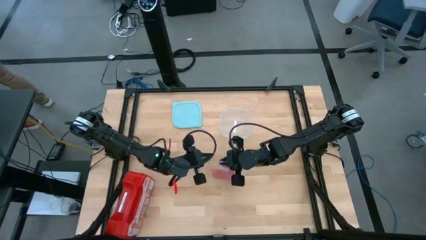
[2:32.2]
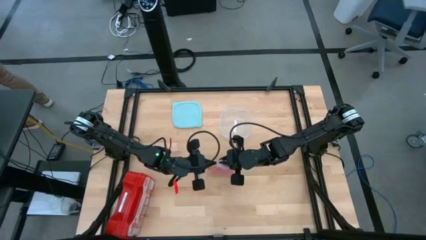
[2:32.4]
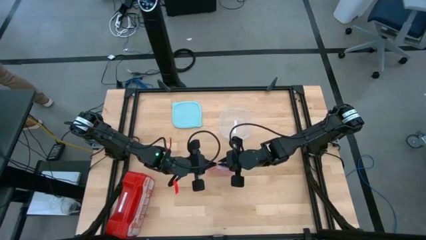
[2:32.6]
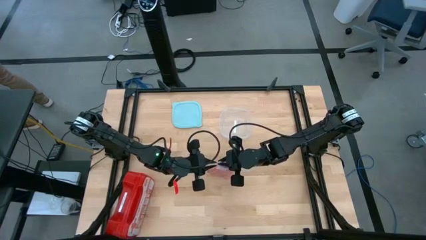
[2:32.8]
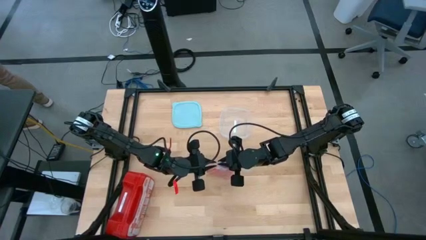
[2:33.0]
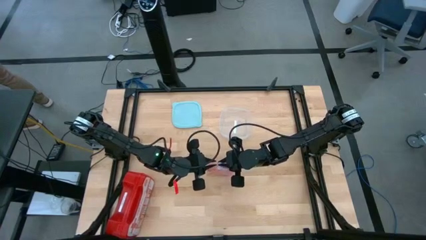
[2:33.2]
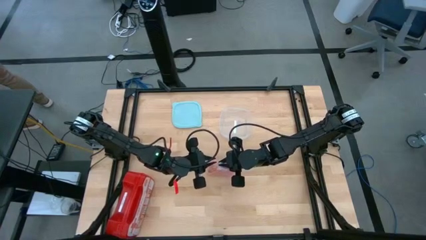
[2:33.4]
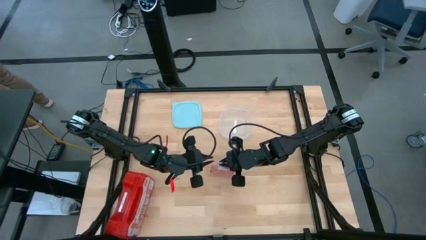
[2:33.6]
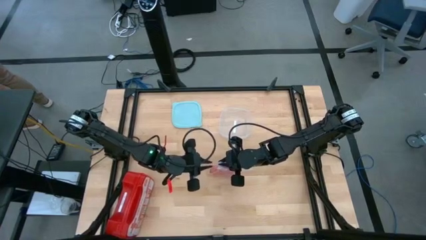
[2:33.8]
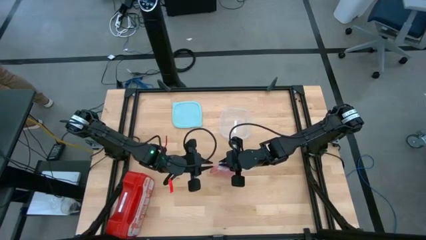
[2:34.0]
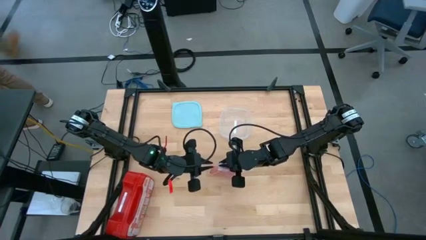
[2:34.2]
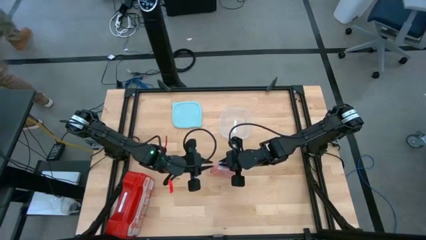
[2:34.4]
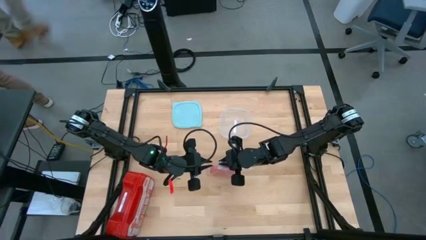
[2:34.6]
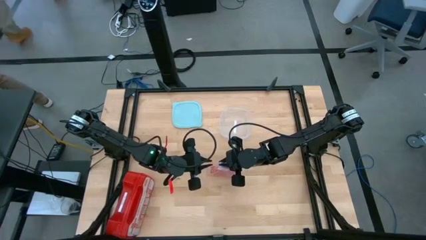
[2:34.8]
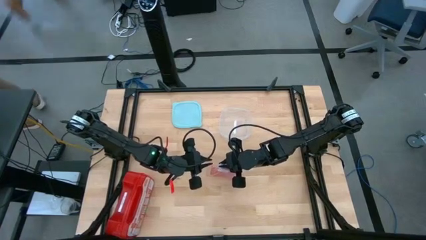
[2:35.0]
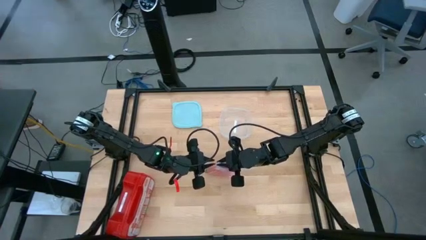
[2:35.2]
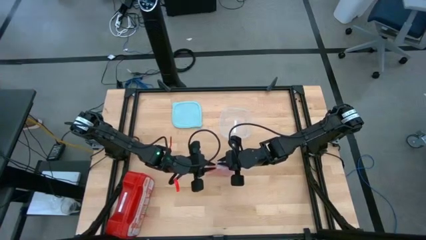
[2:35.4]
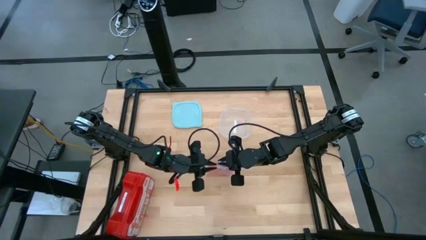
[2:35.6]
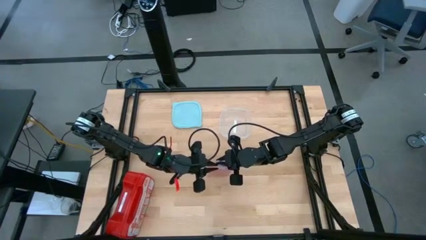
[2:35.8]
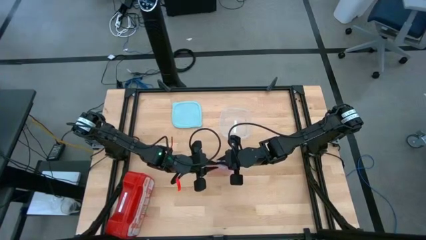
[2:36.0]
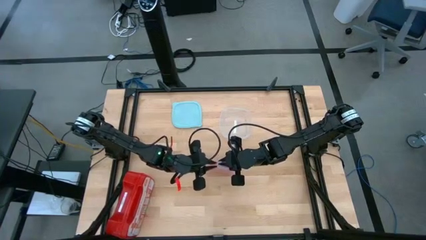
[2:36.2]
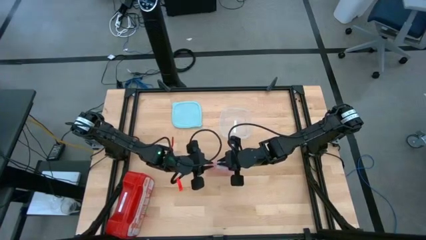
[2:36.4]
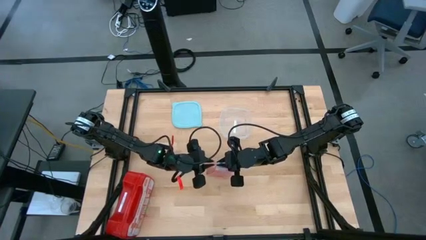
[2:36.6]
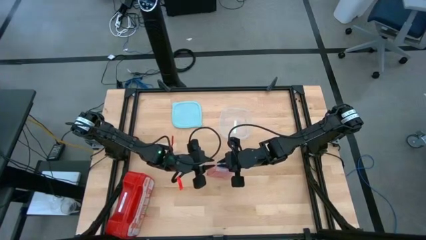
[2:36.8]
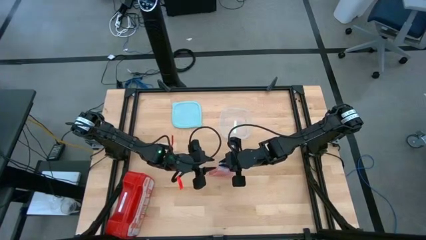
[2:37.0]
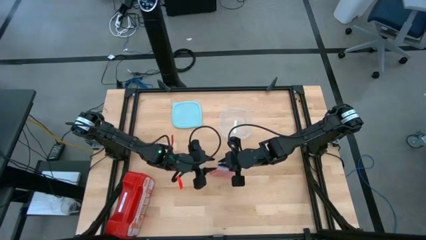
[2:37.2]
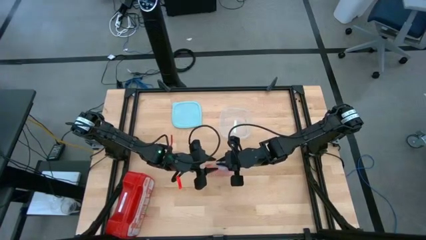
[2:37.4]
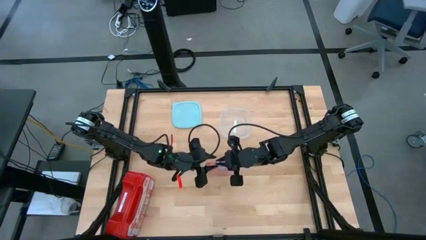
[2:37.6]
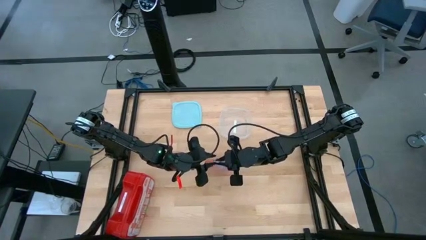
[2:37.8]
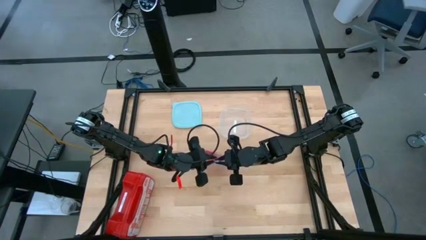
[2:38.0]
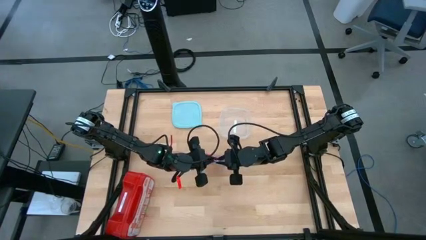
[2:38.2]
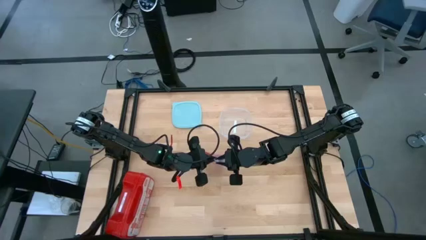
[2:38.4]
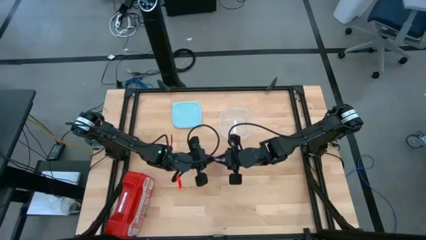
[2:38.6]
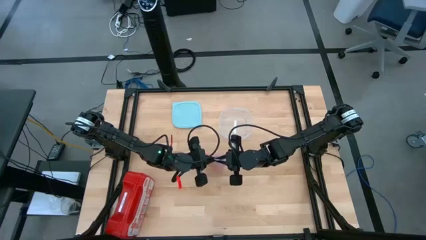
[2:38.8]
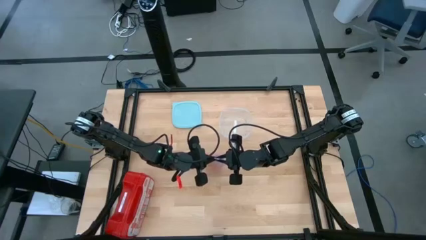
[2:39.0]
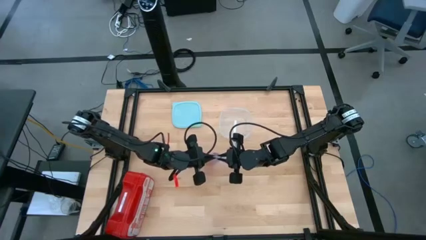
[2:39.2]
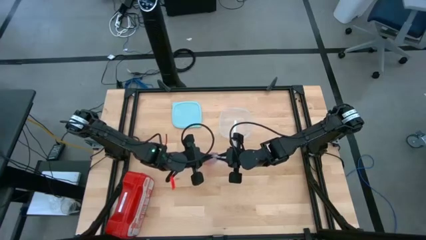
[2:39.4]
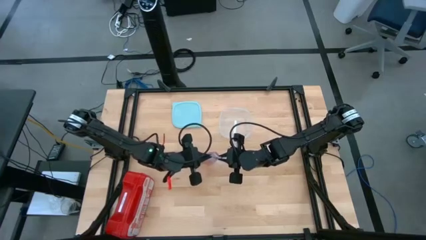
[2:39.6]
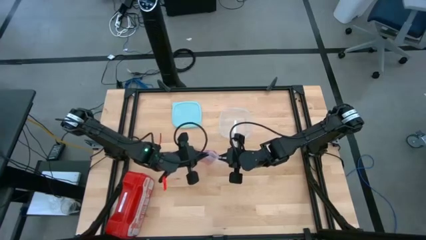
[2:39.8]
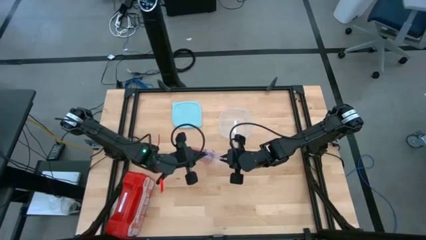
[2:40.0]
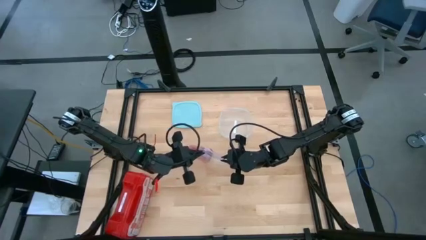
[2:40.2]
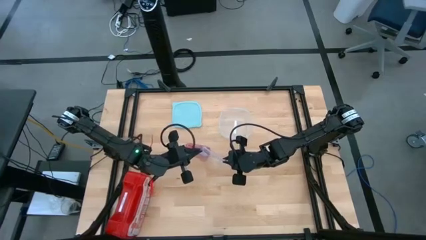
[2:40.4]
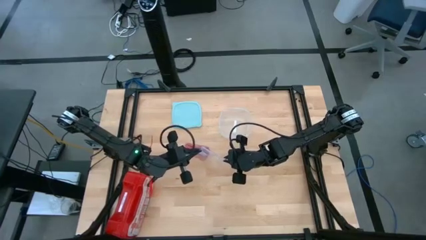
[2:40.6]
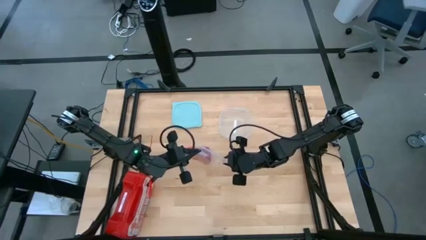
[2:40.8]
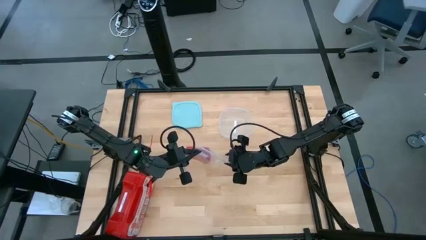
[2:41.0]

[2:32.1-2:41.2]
Task: Roll bandage
Close the transparent zip bag

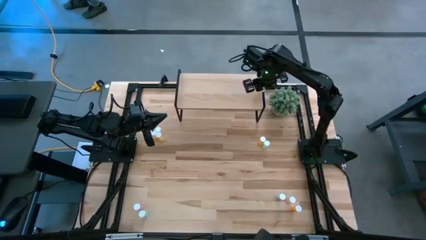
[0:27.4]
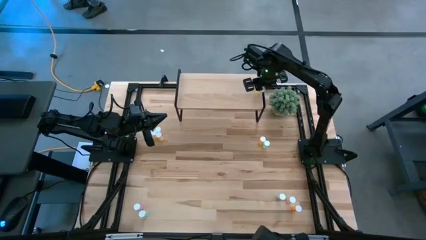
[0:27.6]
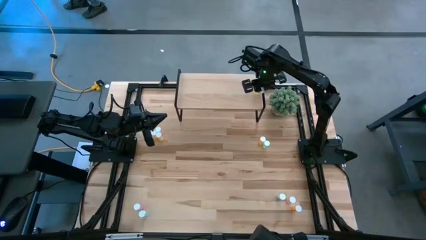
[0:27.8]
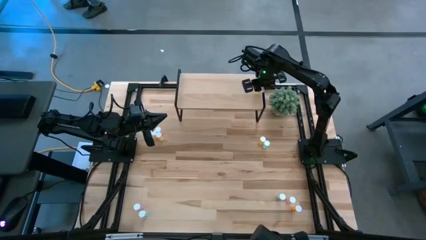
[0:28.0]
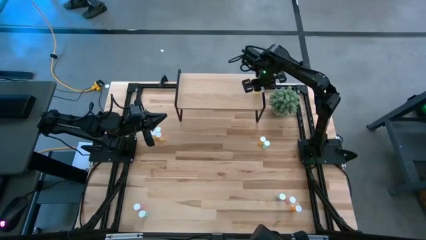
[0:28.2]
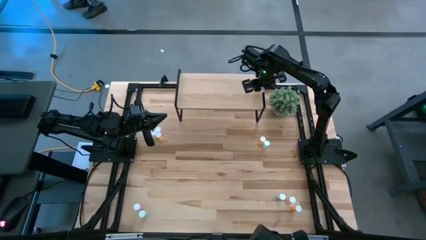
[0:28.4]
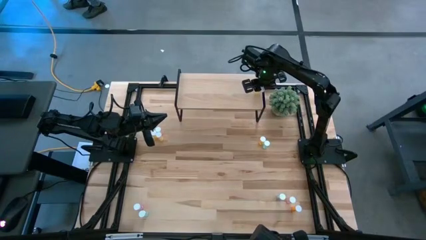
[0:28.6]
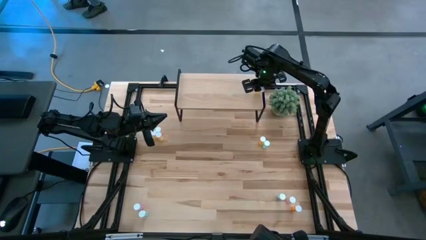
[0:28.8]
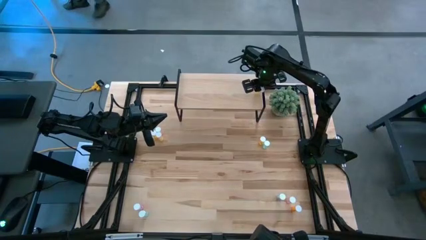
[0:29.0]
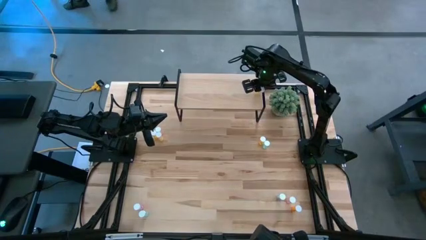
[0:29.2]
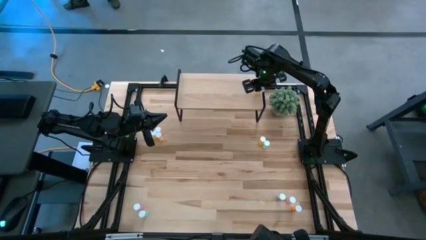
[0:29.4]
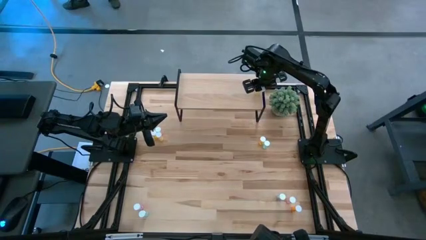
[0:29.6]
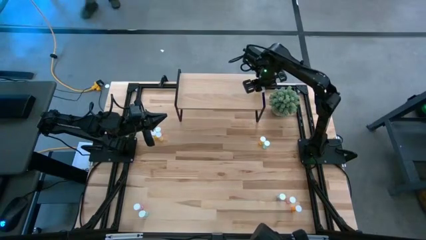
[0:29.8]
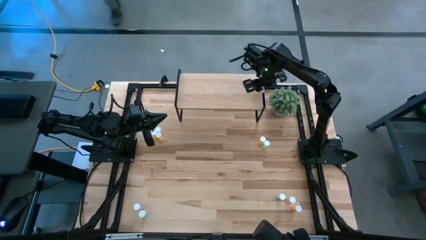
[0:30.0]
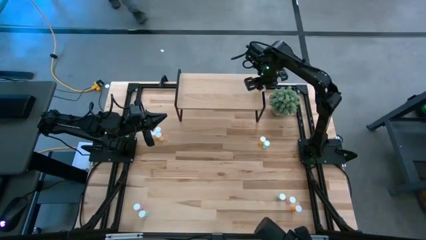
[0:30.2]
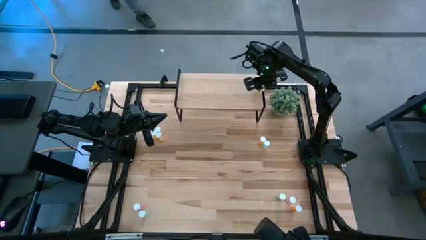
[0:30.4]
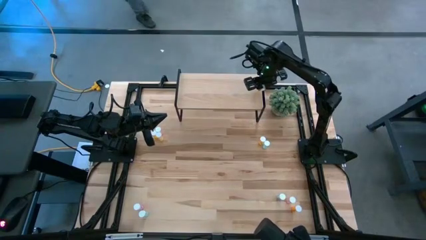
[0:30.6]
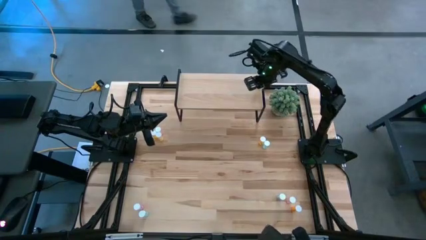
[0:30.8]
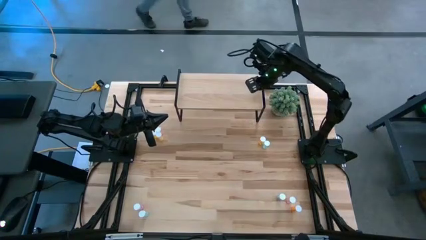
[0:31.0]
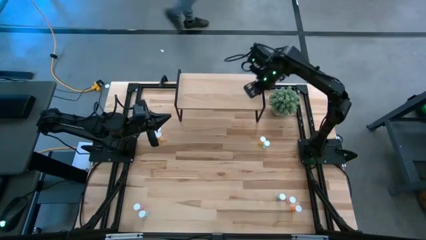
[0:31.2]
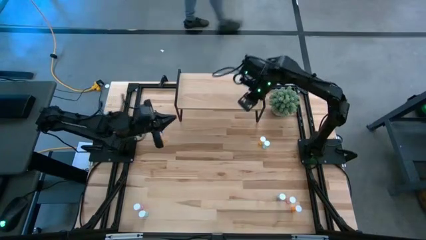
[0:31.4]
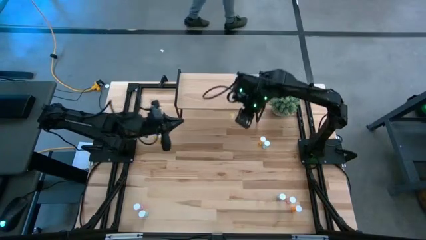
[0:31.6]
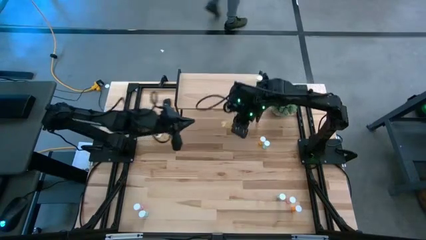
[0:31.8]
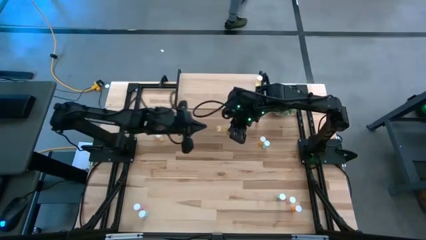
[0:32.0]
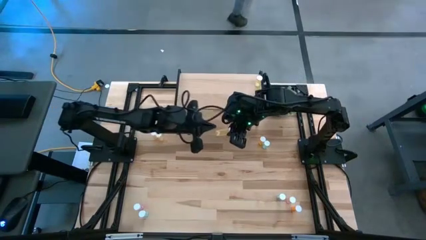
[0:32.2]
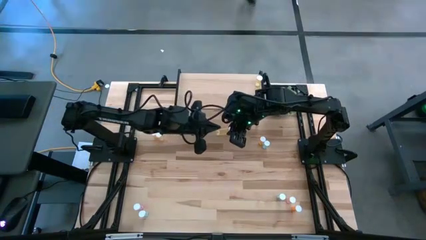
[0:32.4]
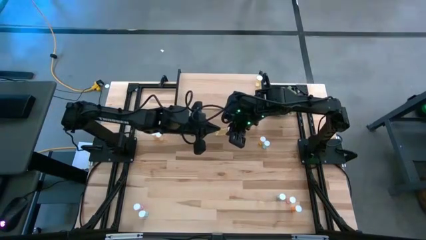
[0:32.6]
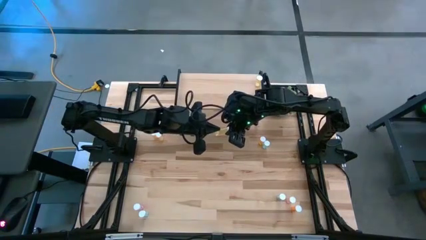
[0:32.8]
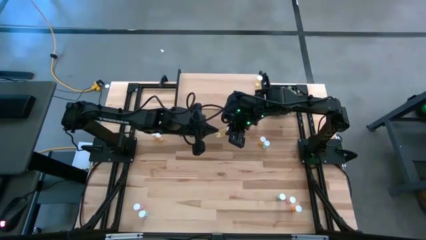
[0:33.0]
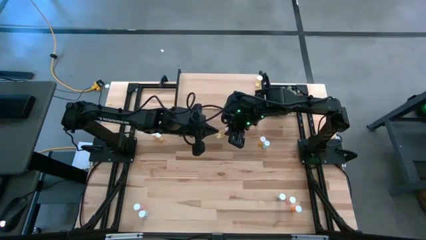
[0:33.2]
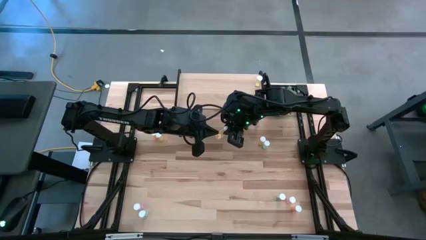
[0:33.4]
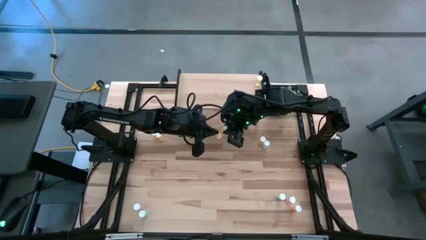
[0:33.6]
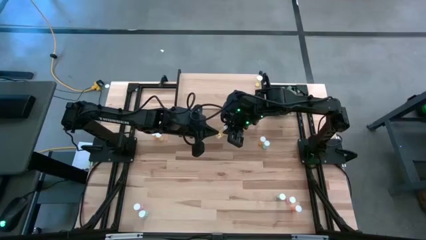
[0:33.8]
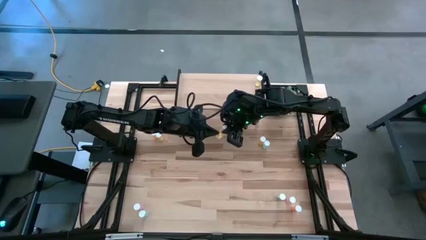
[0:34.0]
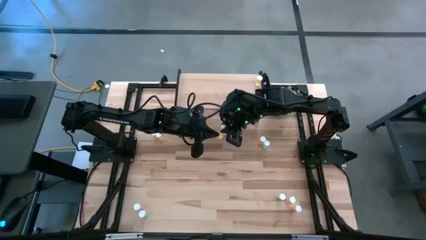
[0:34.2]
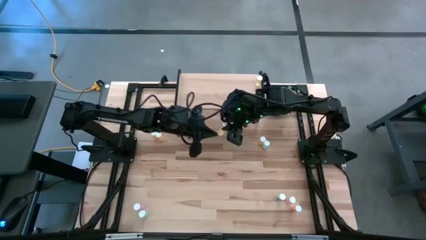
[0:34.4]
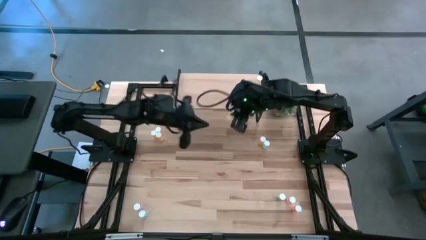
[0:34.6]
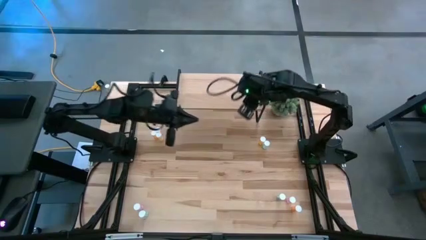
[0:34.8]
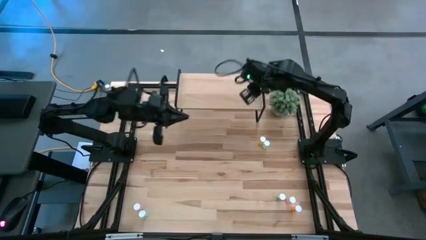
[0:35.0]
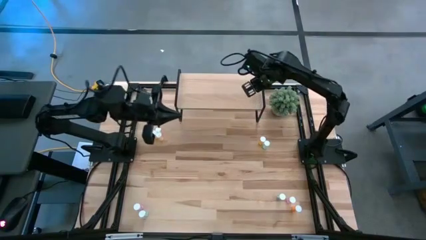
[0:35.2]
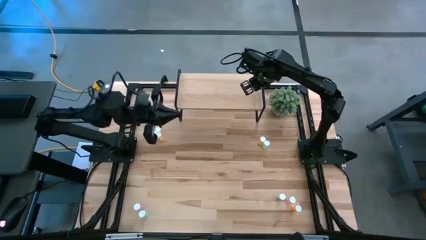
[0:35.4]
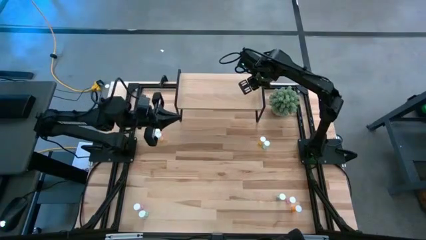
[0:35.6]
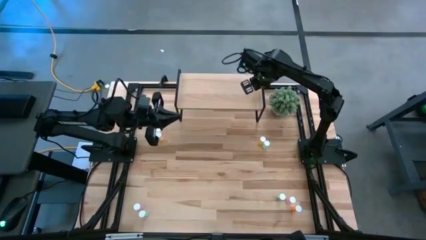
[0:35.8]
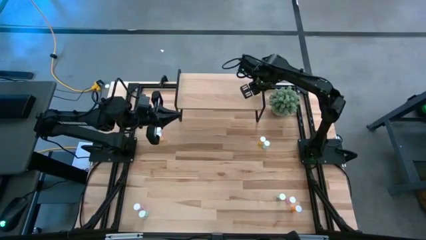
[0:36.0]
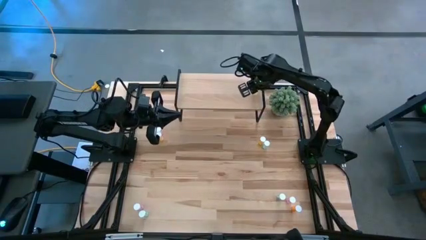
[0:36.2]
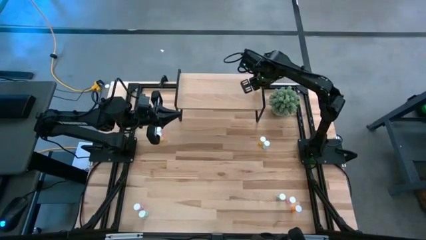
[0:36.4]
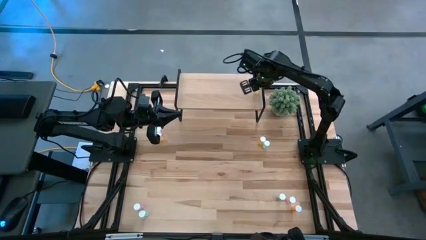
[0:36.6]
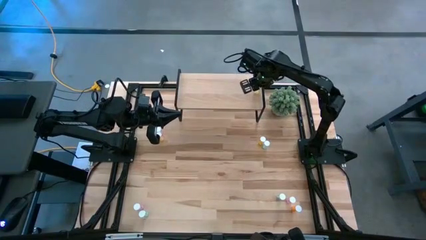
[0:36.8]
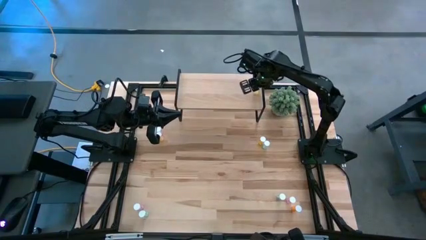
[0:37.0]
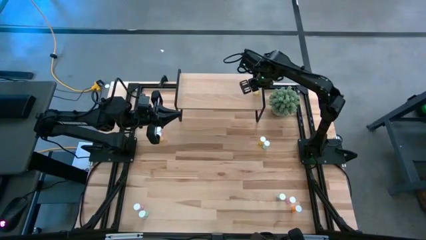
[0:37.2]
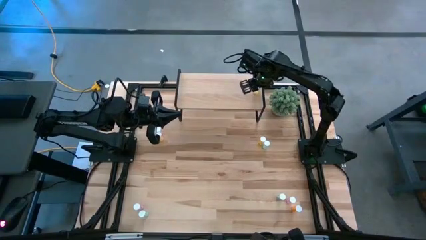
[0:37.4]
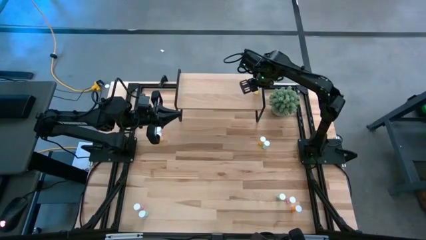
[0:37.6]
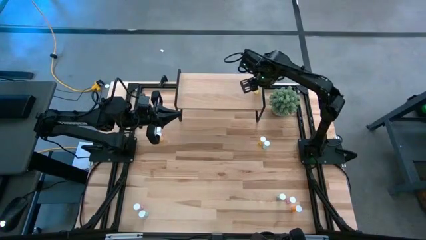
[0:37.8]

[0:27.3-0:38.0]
Task: Pick and place medicine bottles onto shelf by color
Put the bottom yellow pill bottle on the shelf aligned with the other yellow pill bottle
